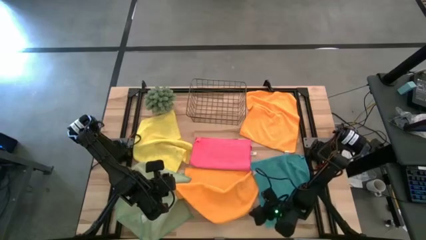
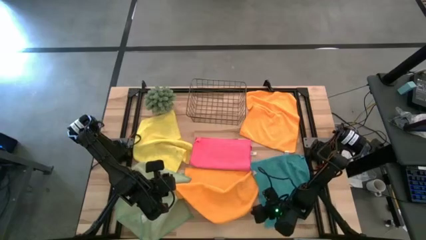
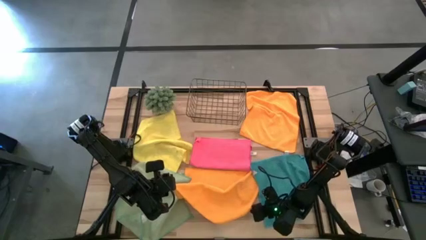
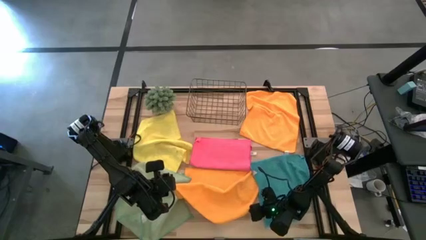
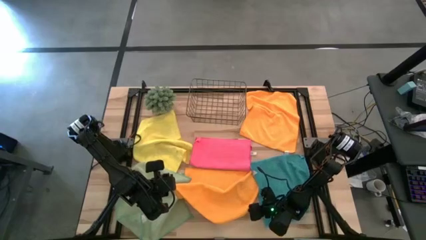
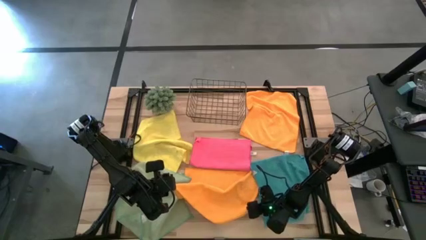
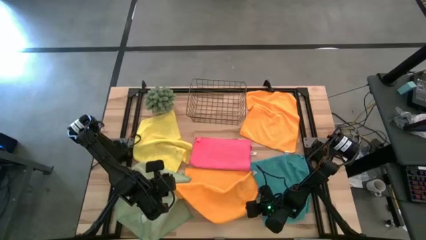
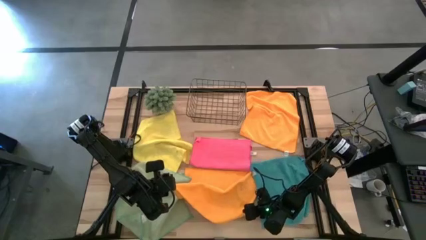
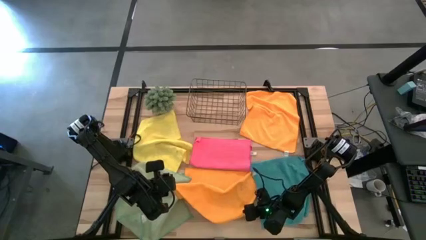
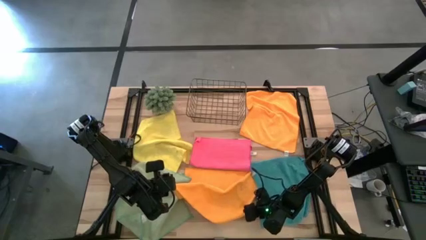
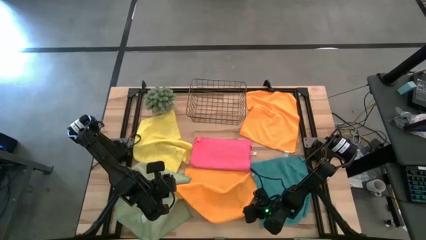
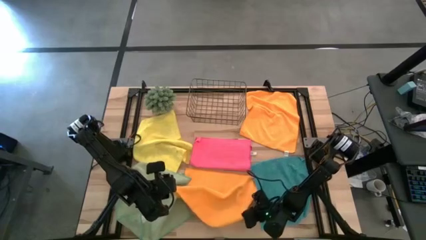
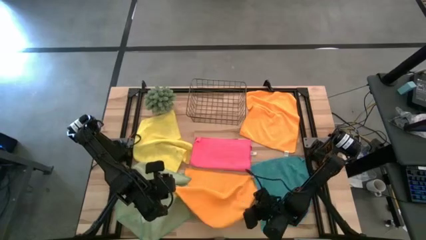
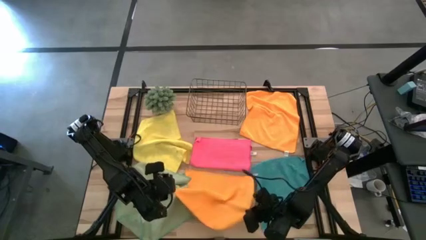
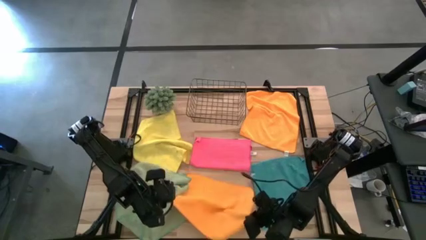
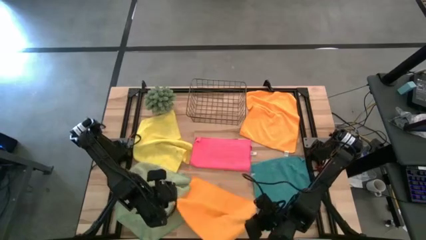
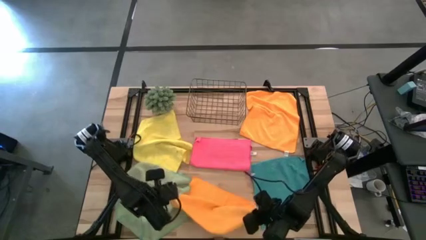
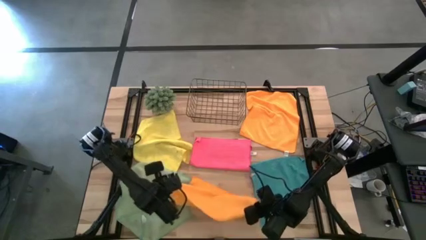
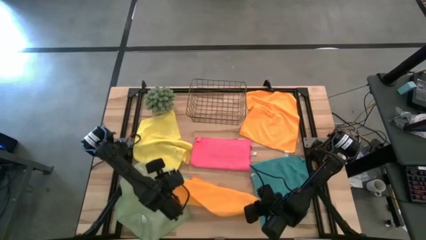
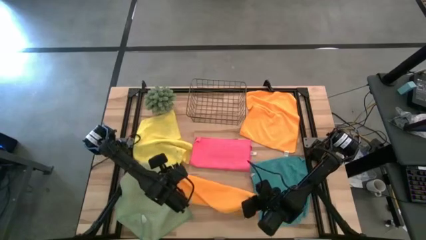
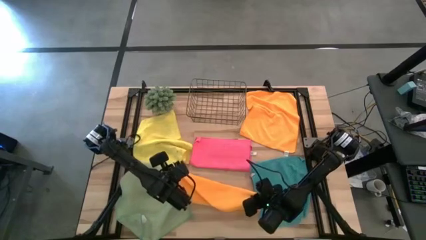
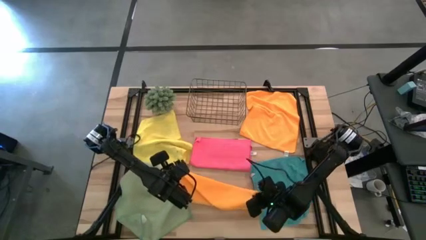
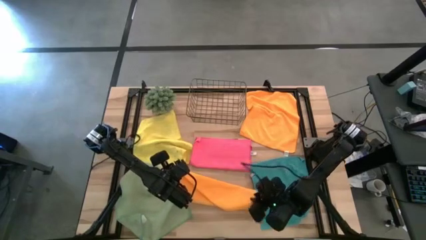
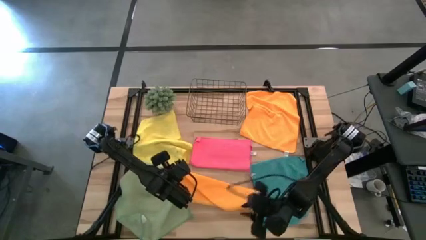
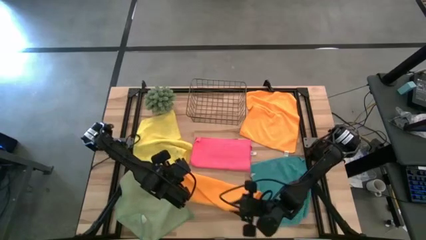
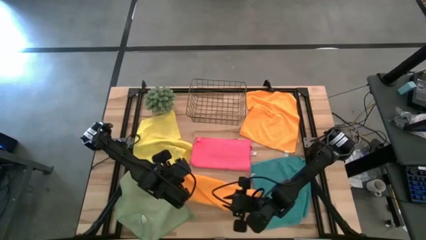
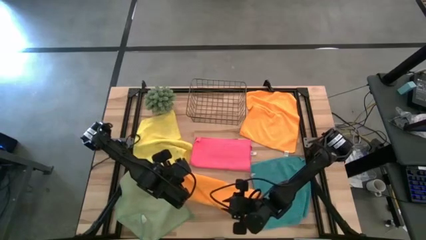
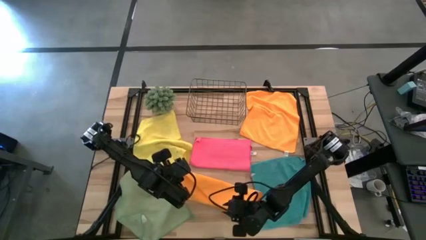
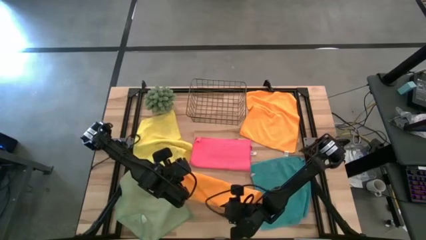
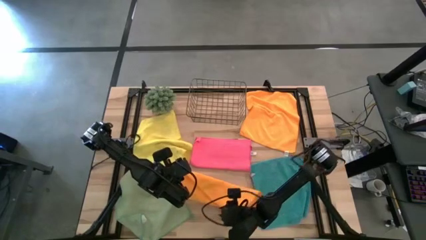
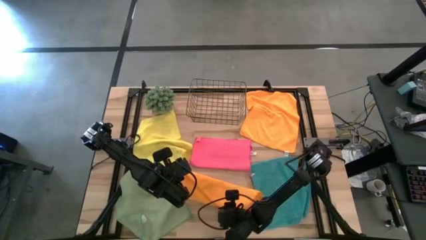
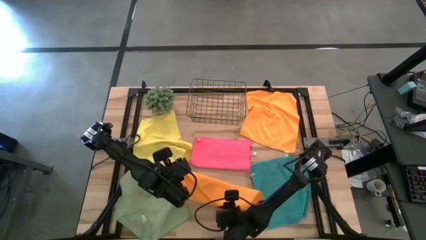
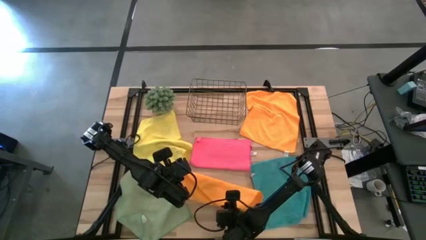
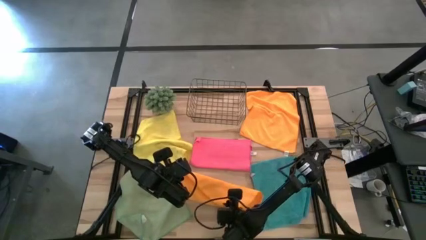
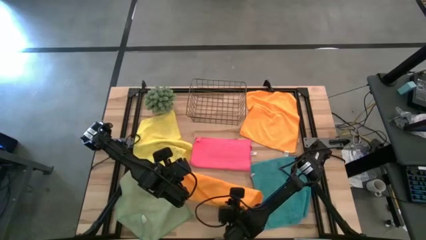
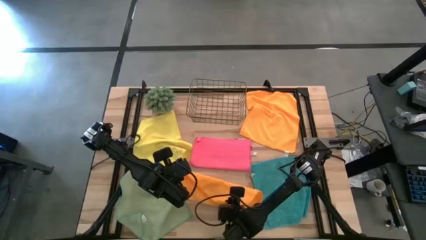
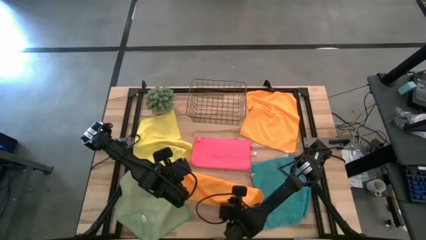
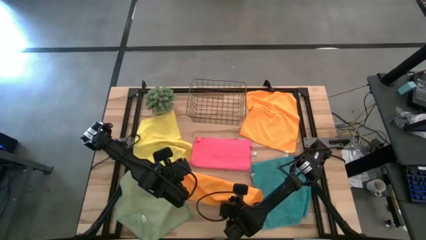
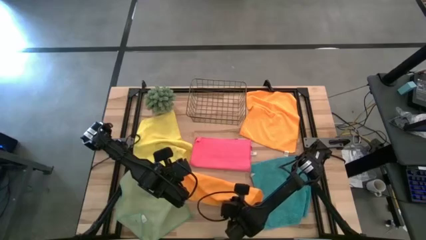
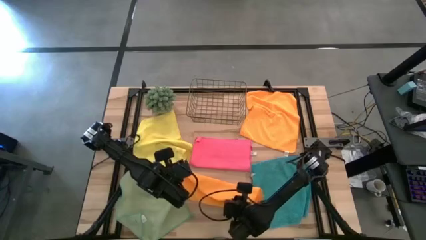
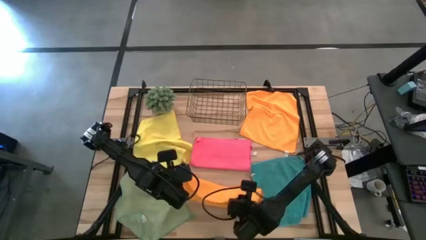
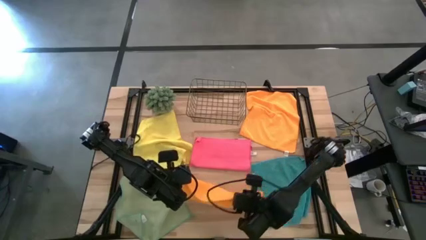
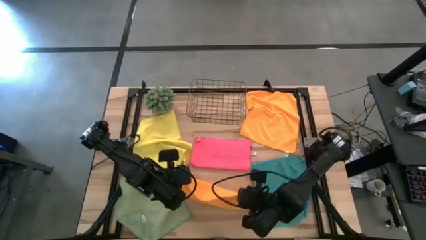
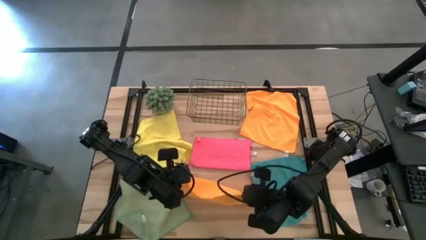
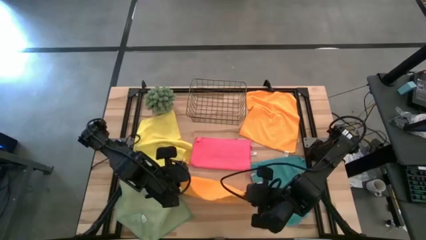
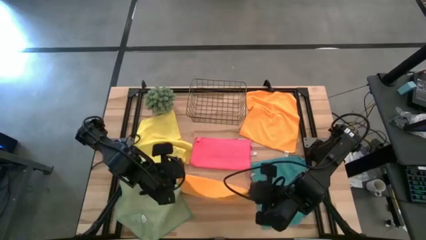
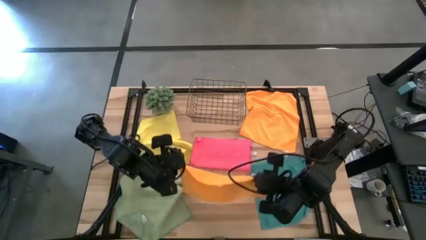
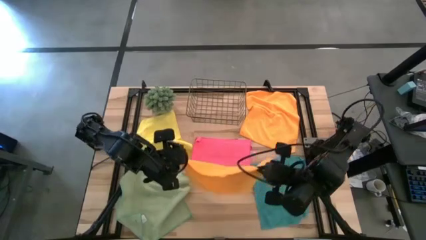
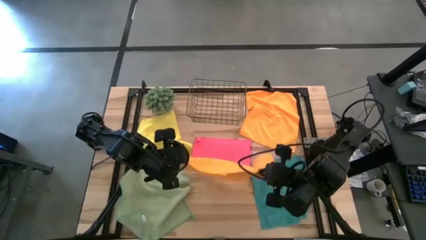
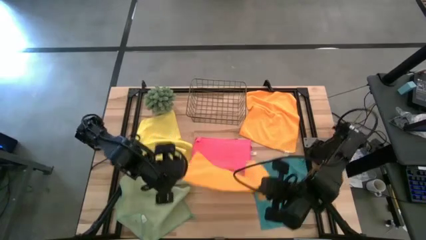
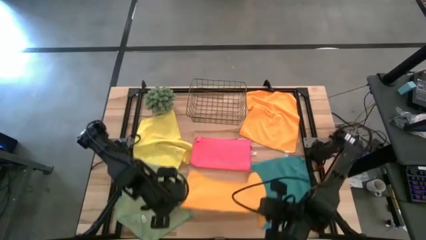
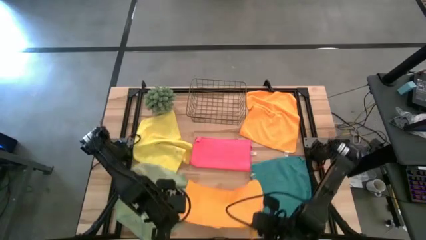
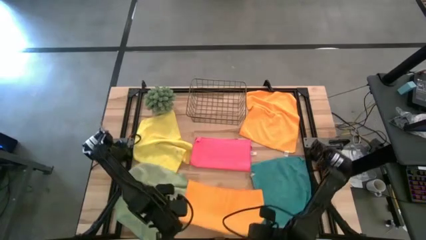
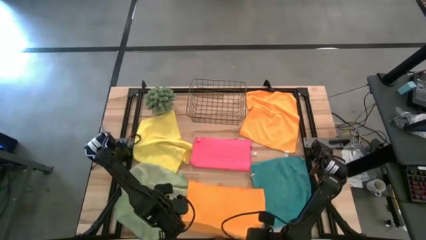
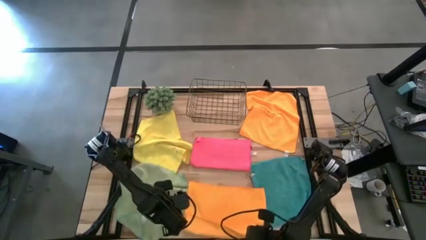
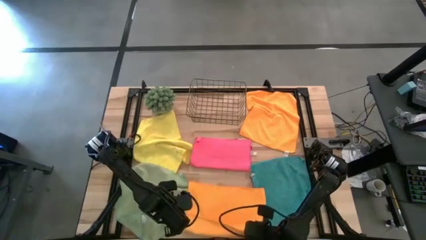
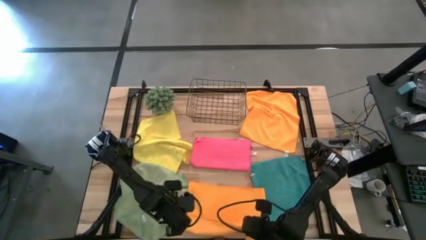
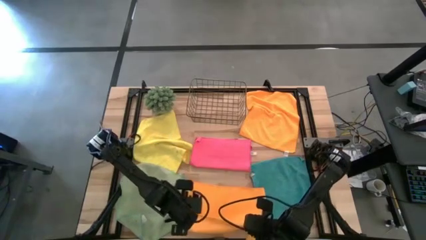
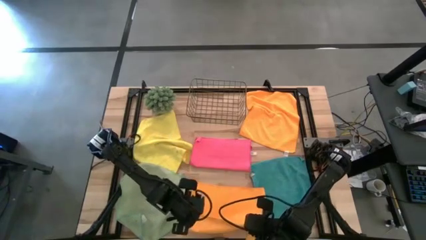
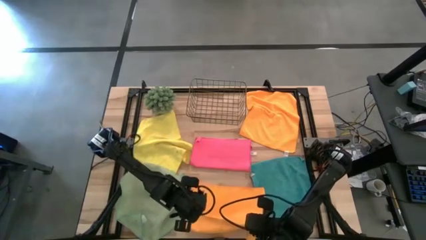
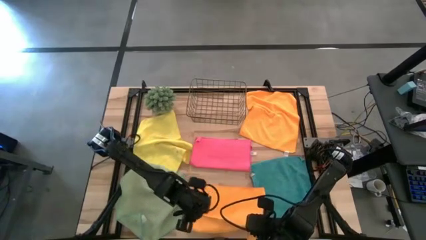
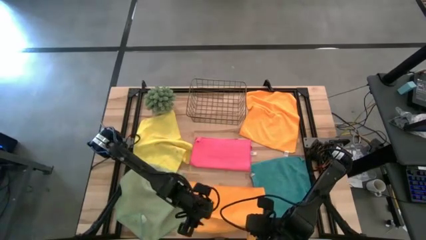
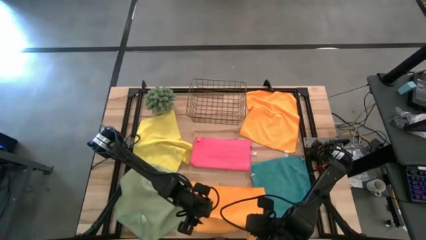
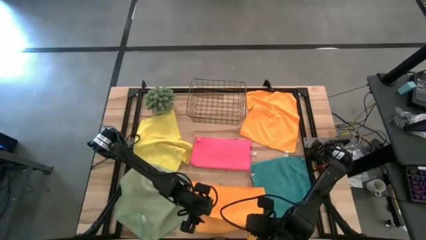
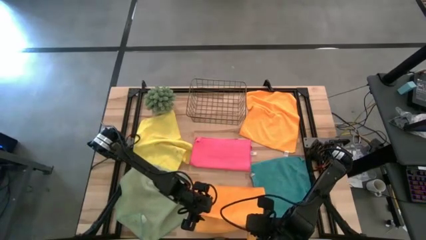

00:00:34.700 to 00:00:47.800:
Task: Fold microfiber towels
Fold the bottom orange microfiber towel
